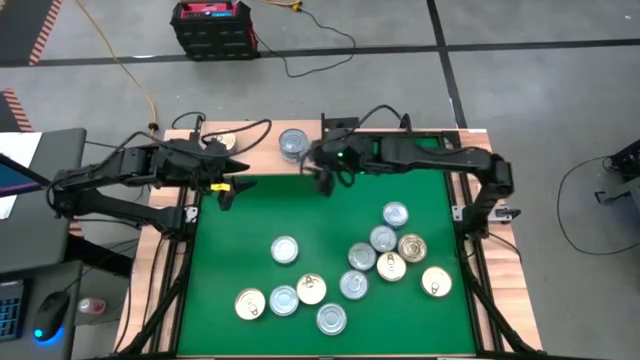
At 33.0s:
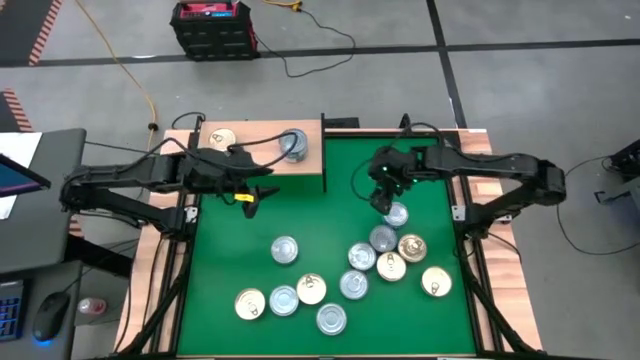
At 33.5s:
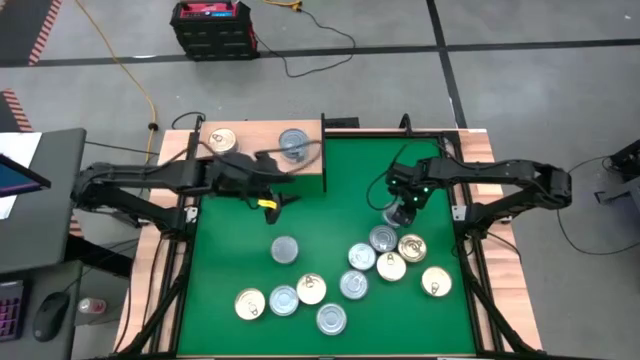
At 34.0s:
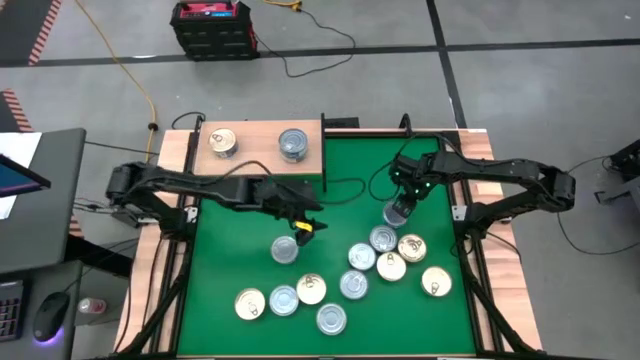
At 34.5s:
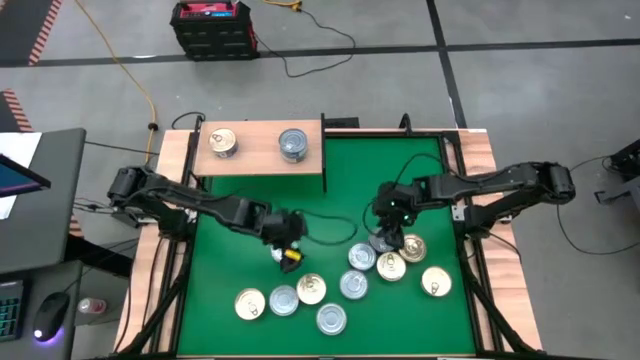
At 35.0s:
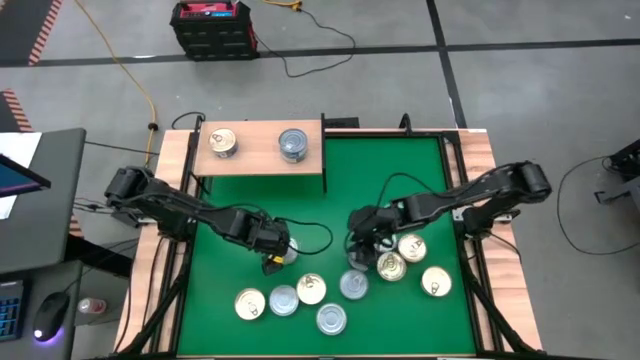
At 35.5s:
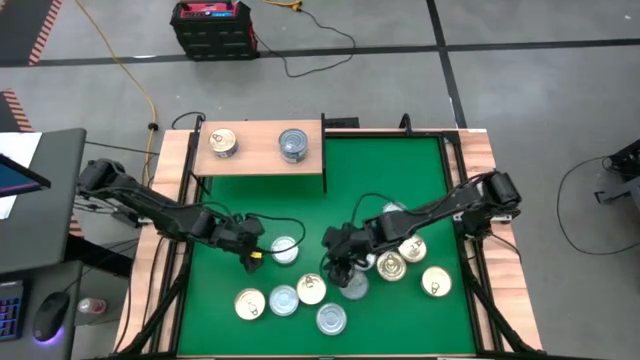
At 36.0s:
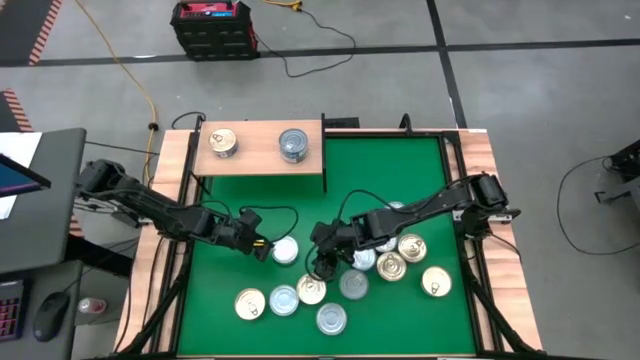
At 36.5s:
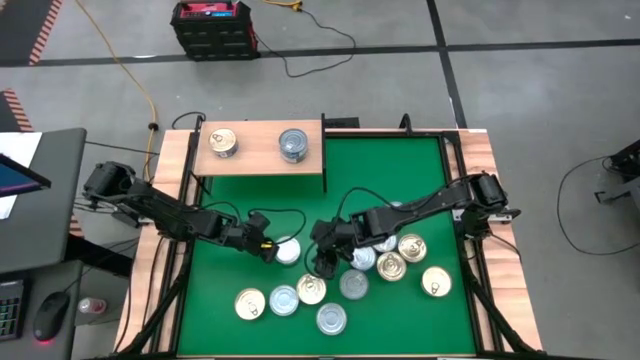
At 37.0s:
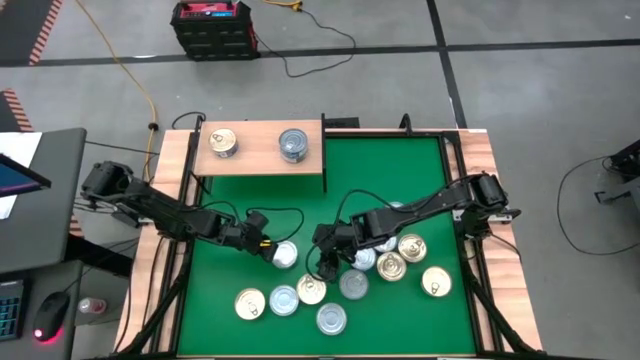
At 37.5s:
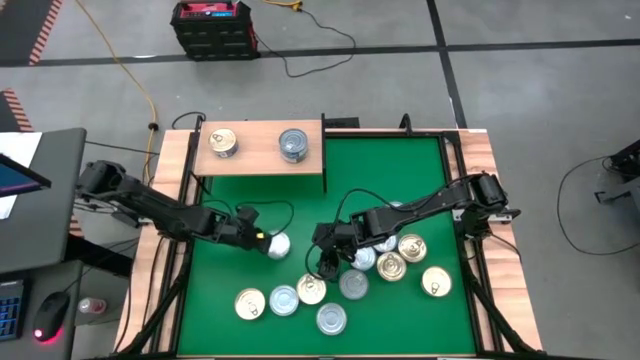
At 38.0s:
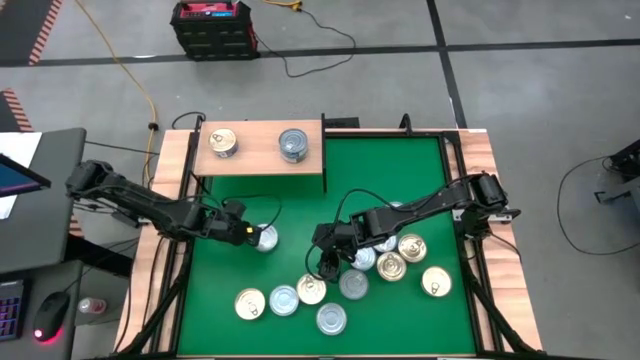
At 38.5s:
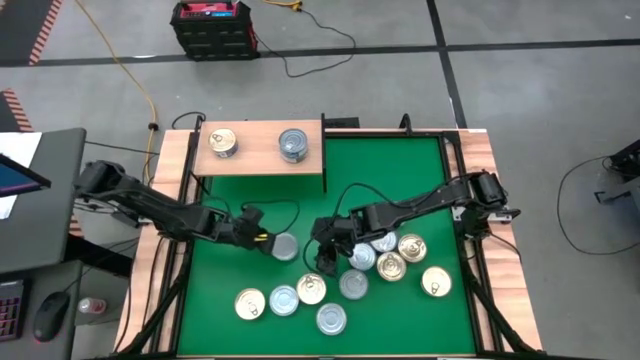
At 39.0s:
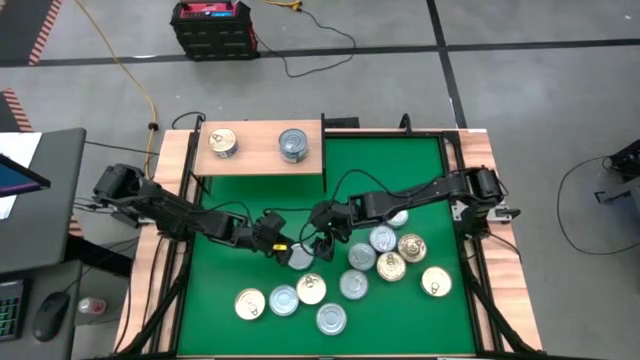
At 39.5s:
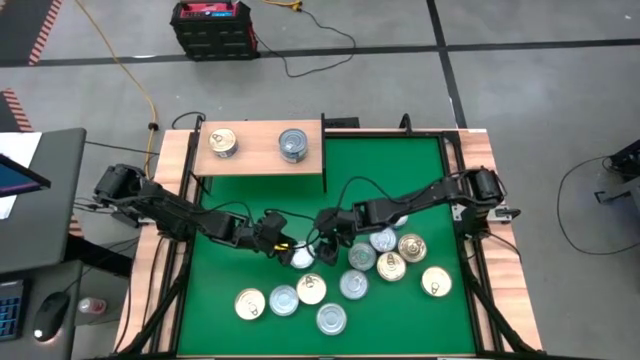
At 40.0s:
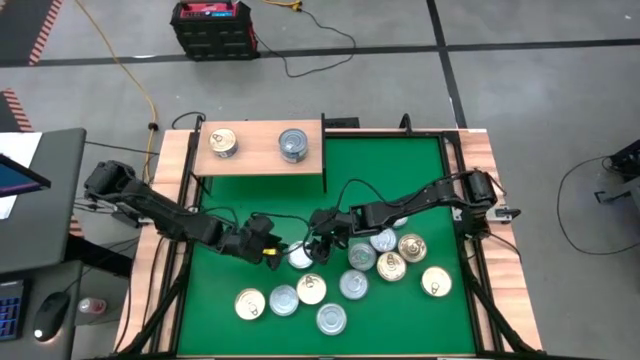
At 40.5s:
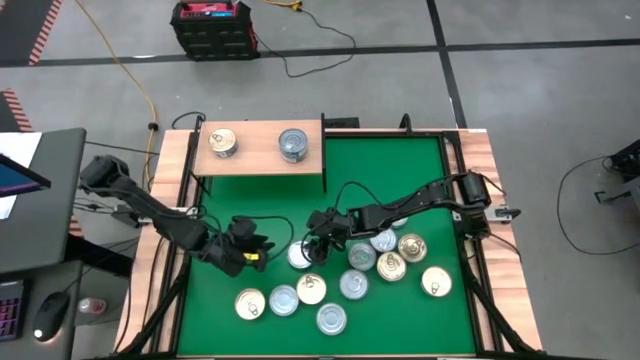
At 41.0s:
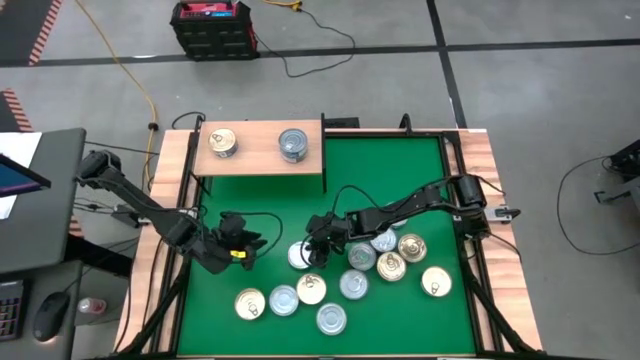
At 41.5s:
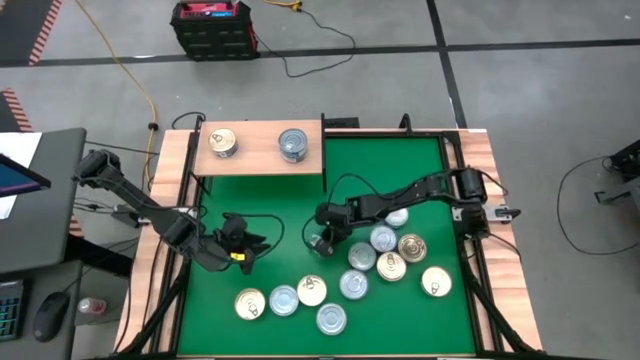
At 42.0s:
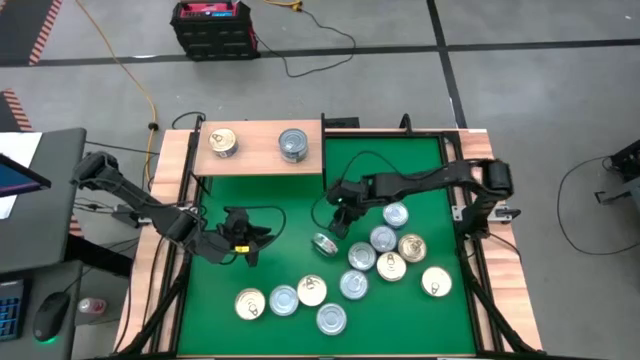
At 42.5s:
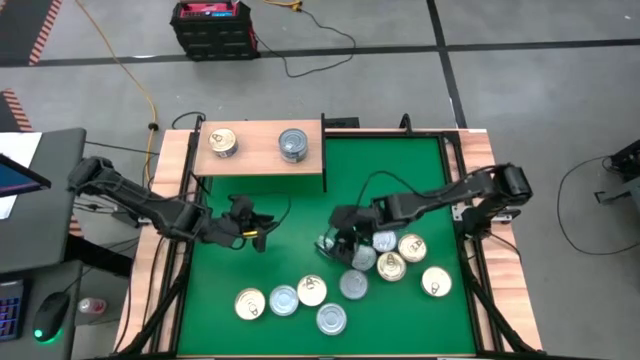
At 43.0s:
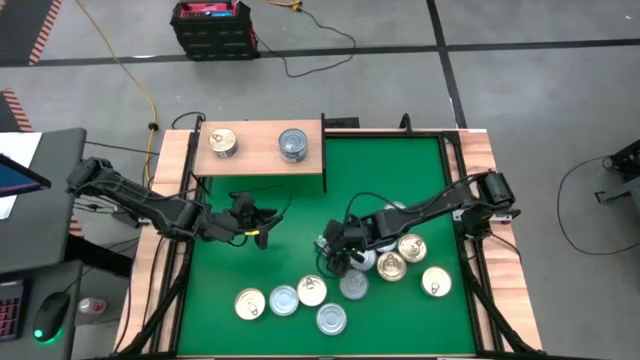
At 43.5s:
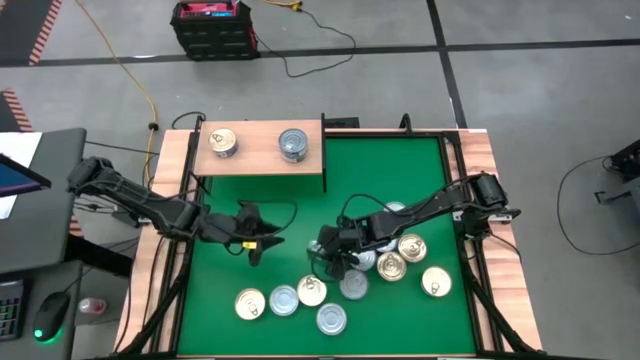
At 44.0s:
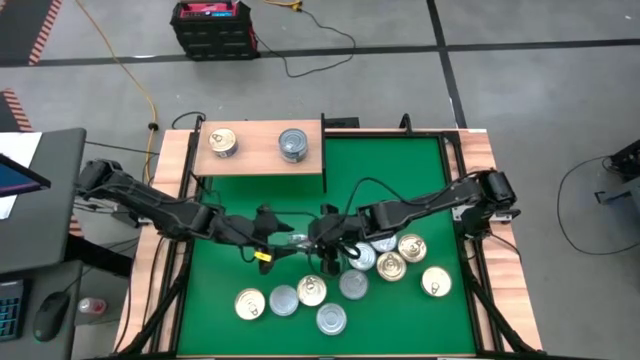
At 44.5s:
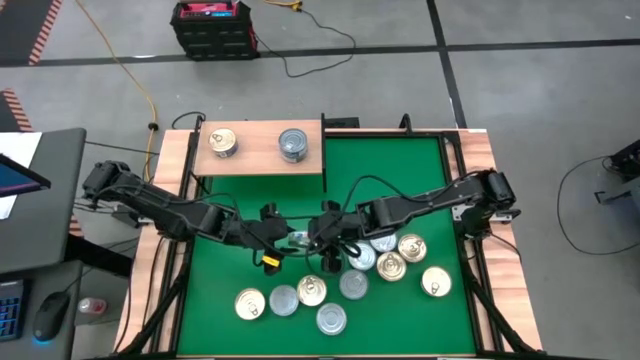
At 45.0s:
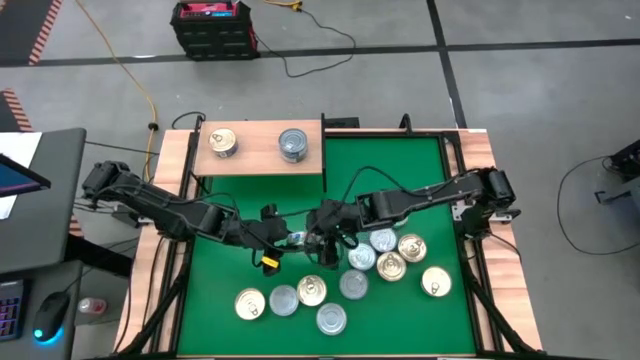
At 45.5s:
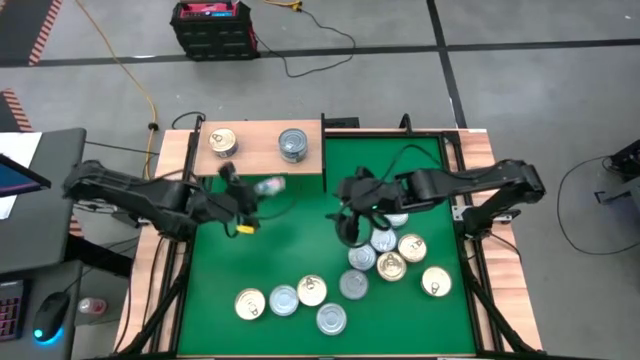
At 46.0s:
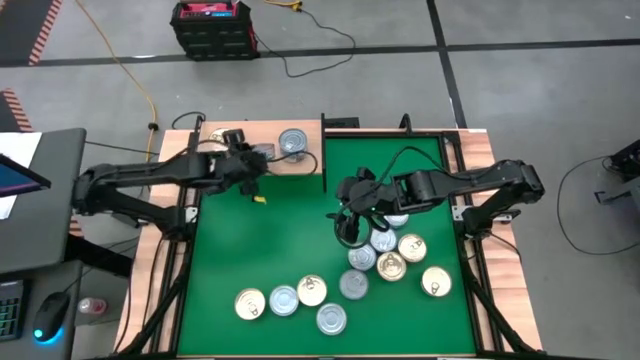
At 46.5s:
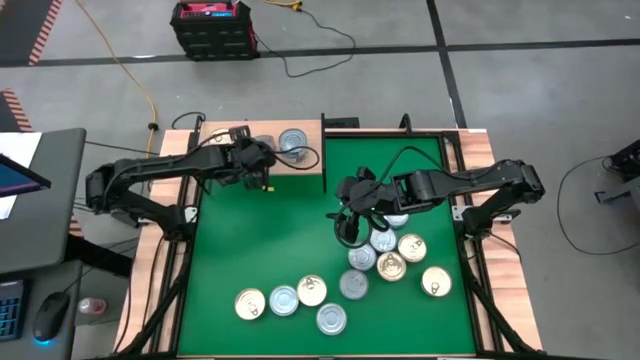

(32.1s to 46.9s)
Task: Stack canned seafood by type on shelf
Put the green tuna can on the shelf

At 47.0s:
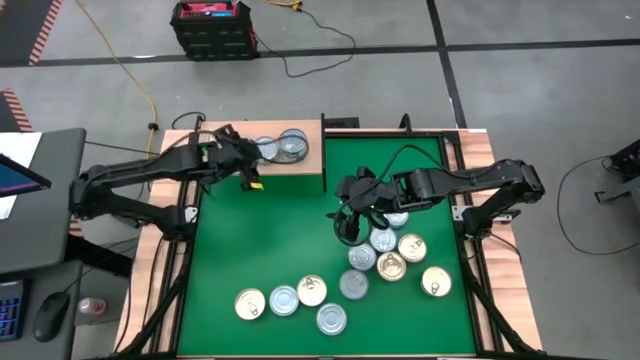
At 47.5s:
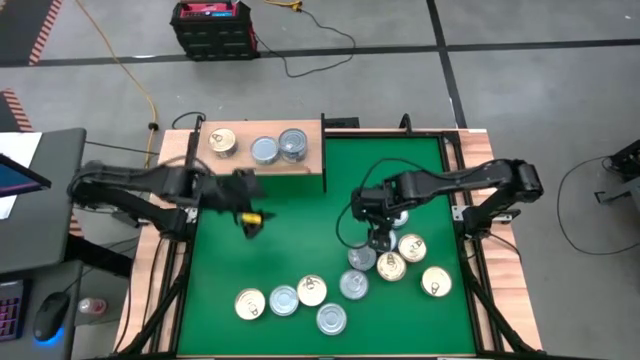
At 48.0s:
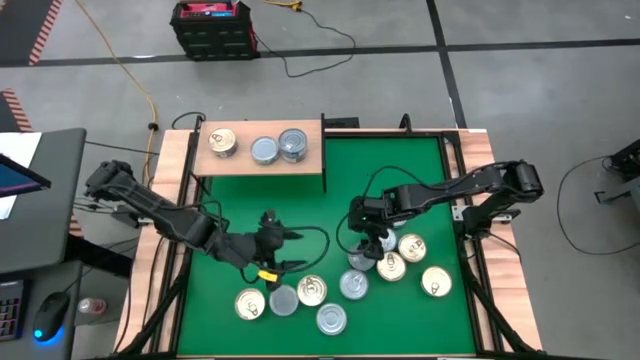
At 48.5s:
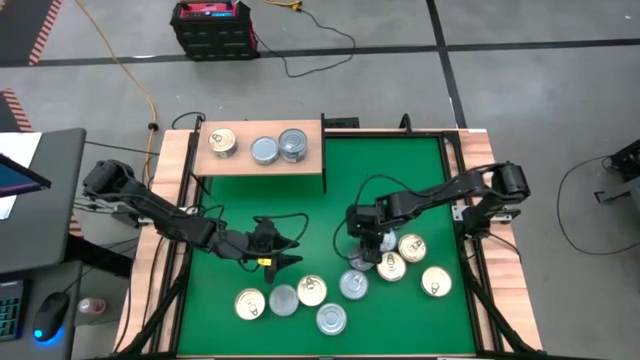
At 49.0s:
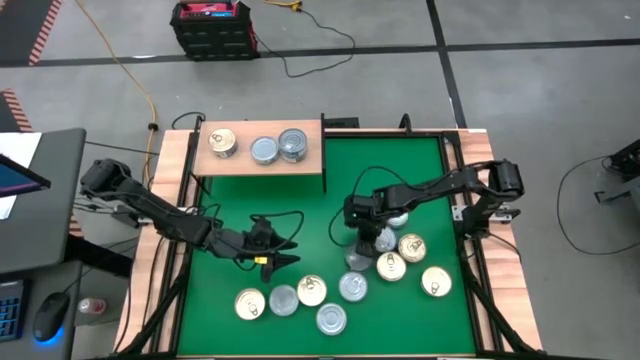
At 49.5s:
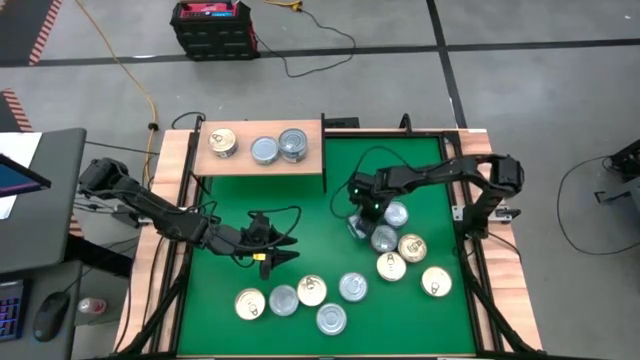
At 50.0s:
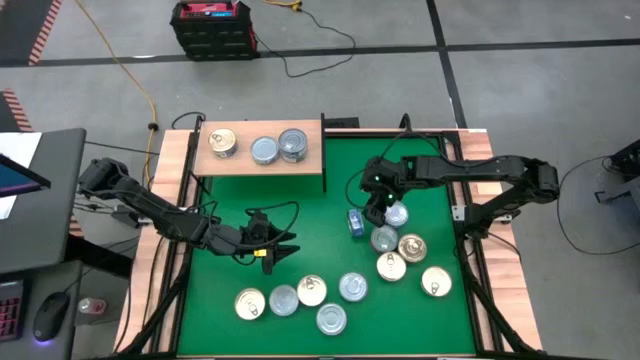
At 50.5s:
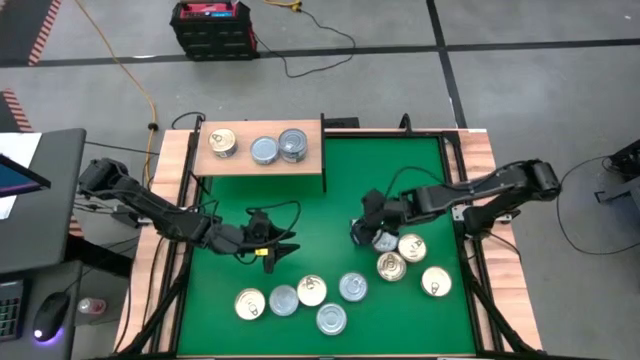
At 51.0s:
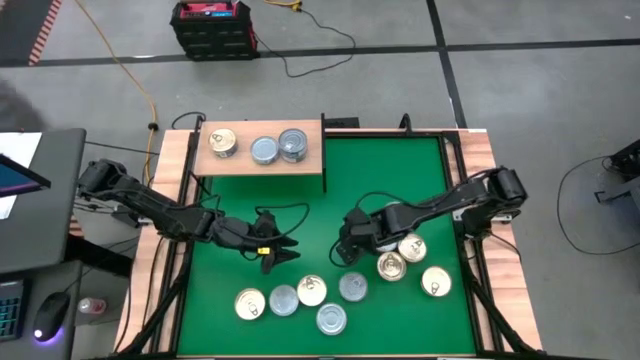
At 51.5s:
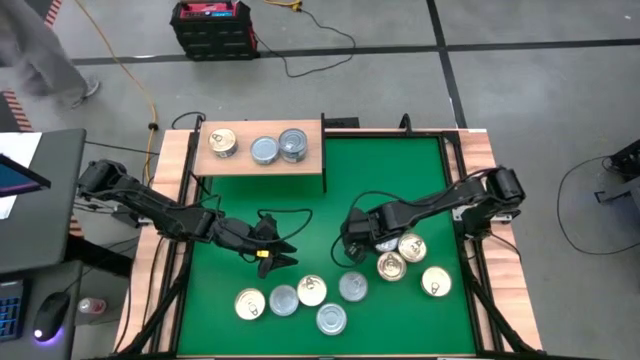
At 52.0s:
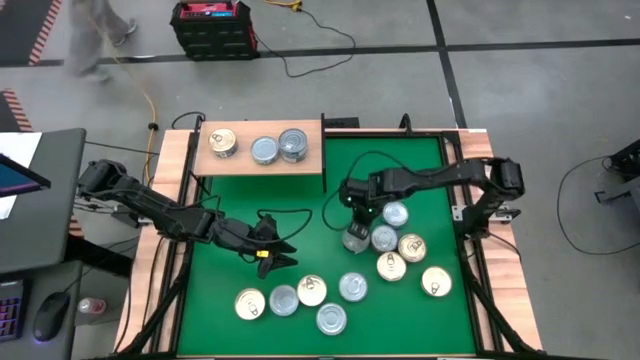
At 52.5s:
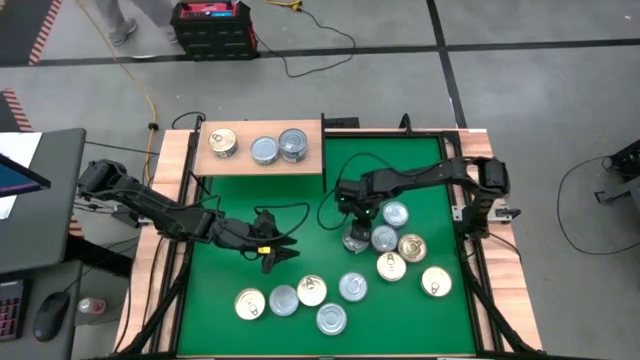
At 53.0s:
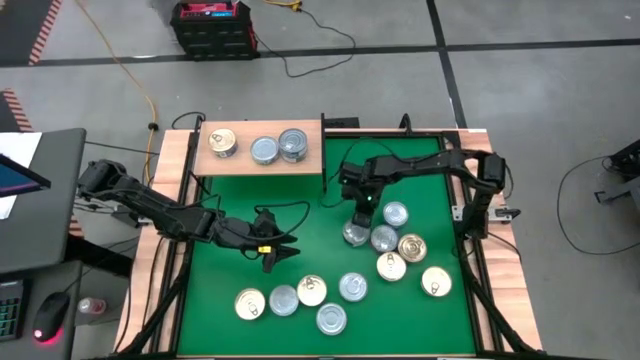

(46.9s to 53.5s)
Stack the dark blue tuna can on top of the dark blue tuna can on the shelf
